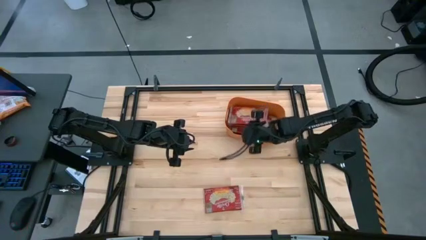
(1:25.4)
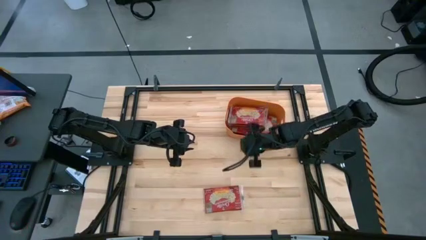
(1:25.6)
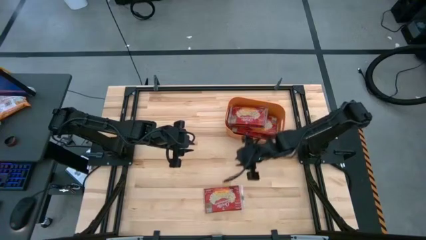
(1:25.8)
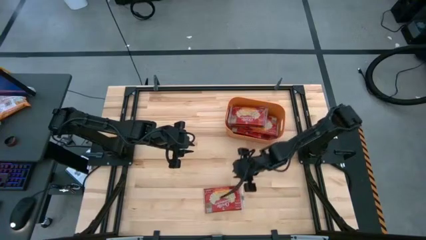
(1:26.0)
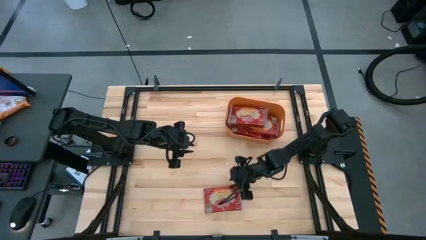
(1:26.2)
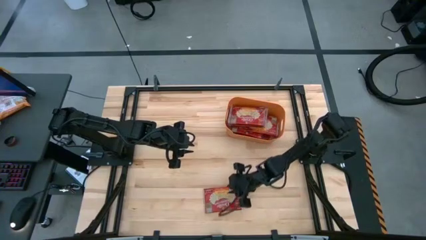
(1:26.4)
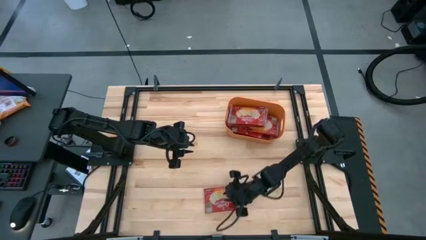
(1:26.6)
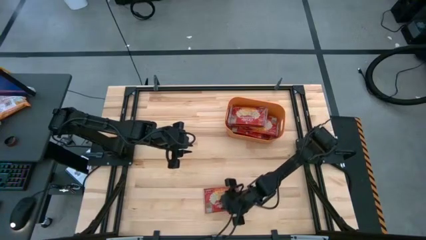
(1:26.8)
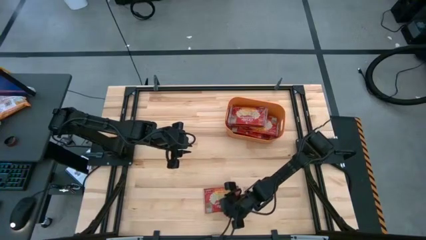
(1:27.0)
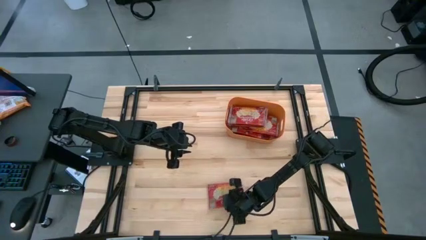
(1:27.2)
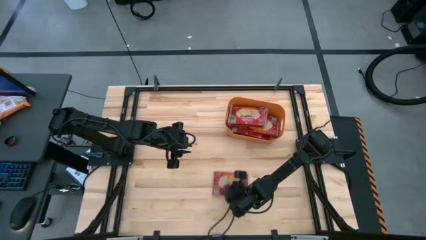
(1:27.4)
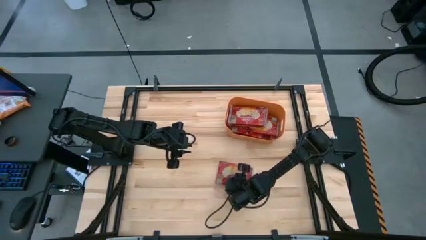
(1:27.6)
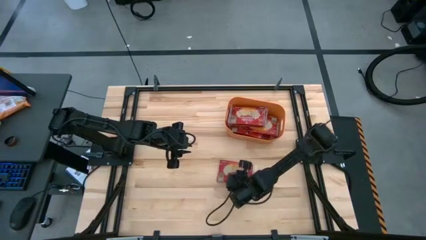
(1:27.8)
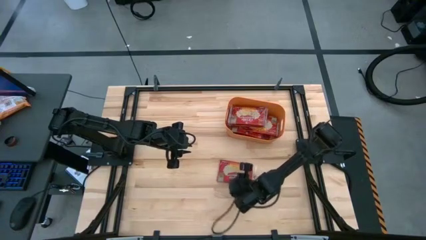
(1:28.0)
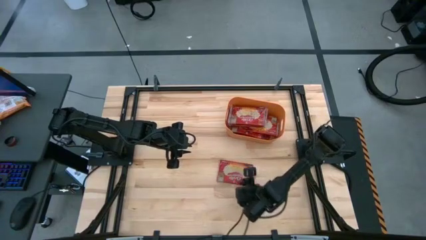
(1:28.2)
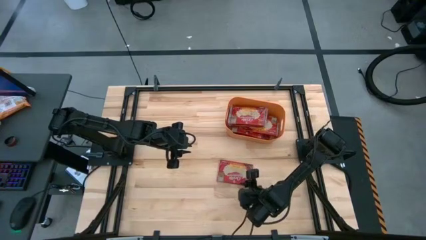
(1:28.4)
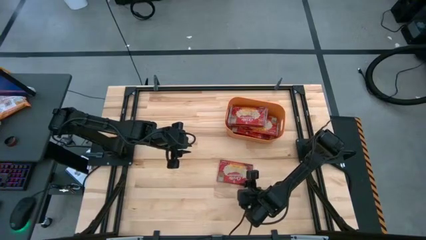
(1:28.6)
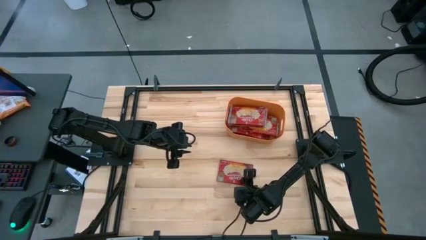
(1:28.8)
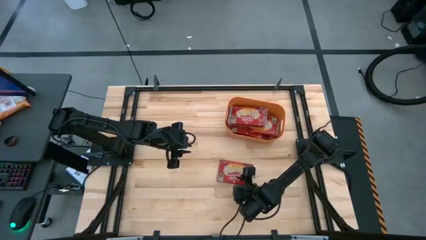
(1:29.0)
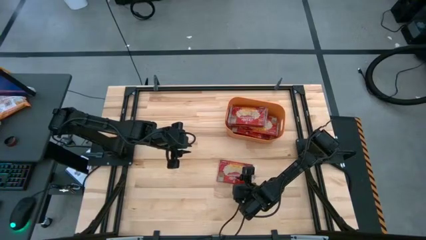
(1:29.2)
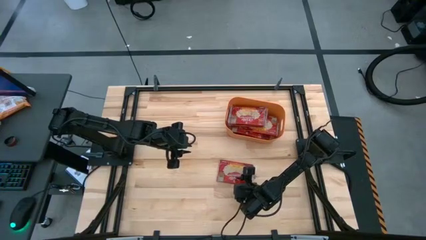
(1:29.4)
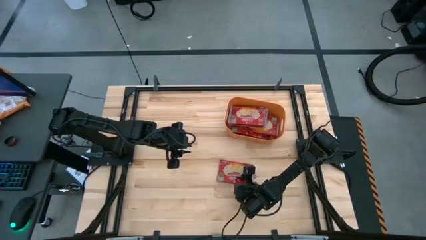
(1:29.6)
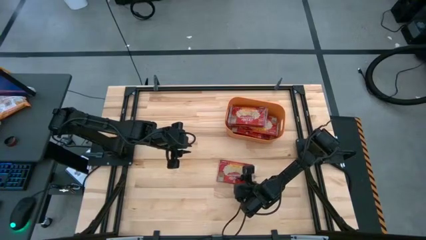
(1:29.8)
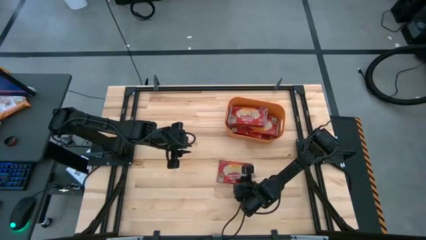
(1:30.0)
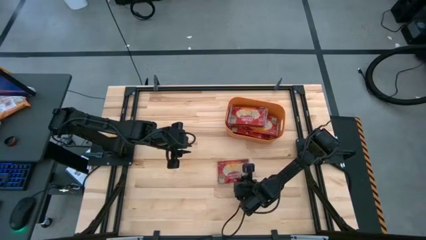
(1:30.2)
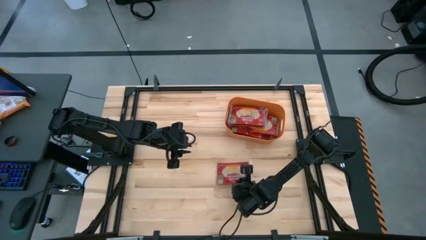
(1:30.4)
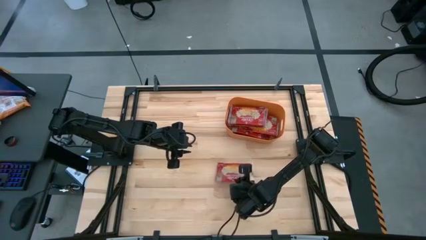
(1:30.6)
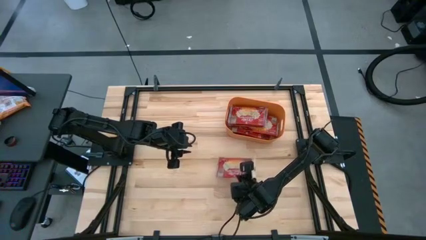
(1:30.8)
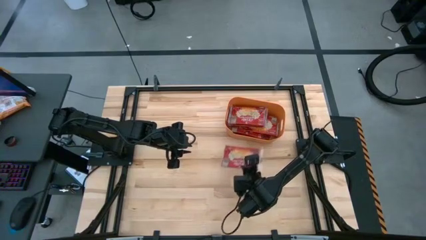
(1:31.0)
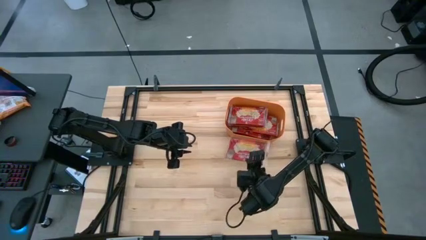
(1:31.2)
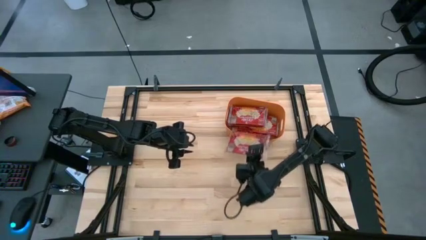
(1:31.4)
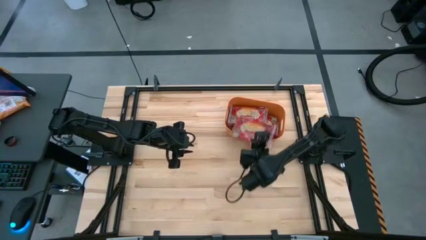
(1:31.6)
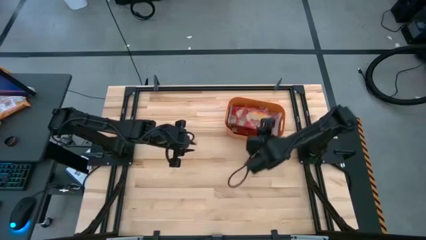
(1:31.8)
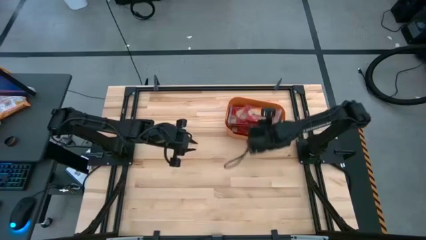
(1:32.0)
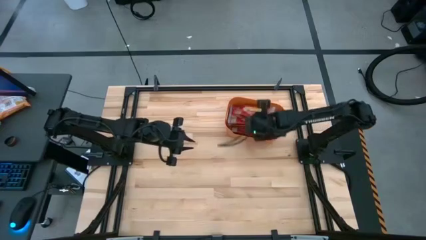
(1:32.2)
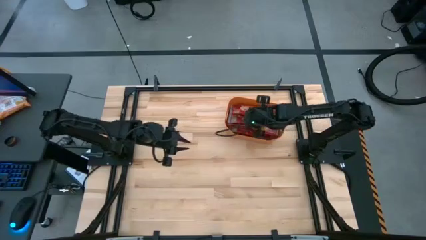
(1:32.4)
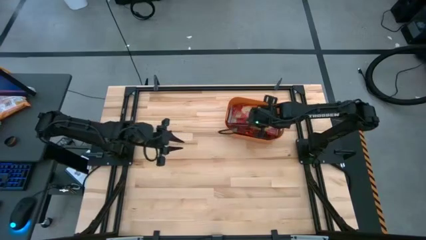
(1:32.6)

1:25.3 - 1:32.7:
Task: Sort popcorn bags into baskets
Put the popcorn bag into the orange bin

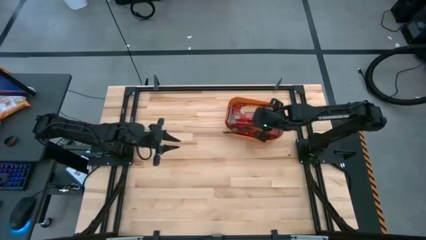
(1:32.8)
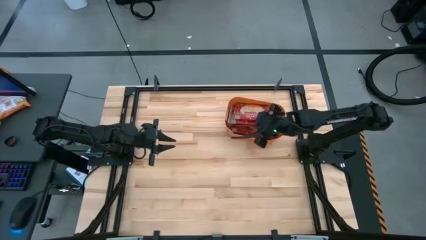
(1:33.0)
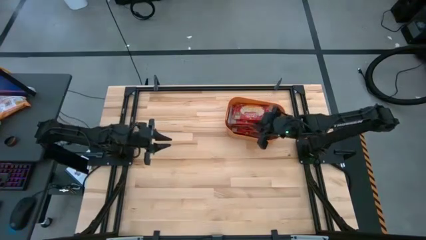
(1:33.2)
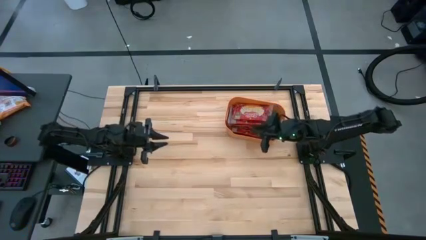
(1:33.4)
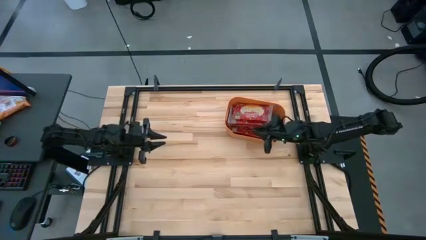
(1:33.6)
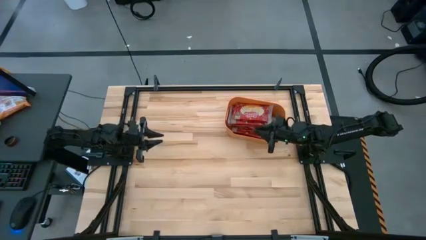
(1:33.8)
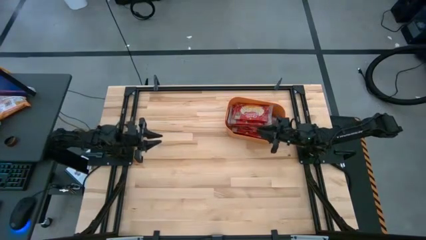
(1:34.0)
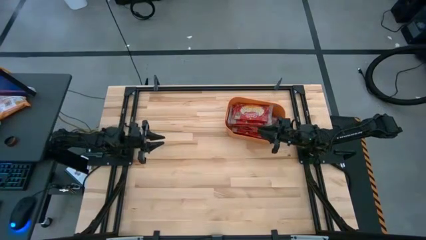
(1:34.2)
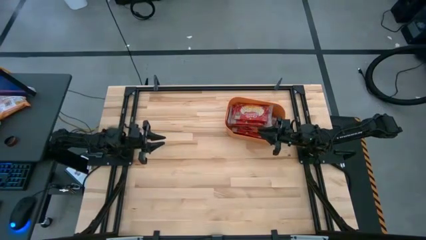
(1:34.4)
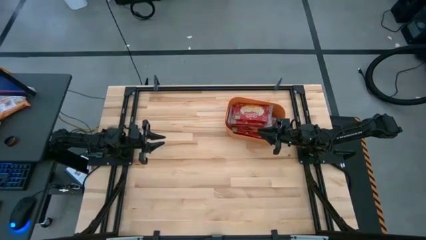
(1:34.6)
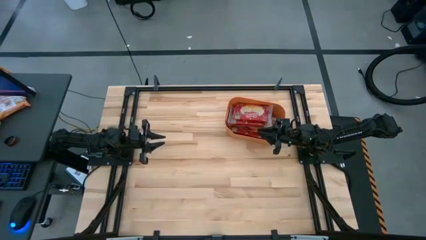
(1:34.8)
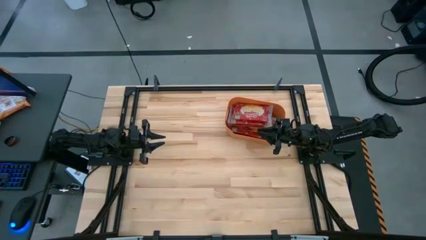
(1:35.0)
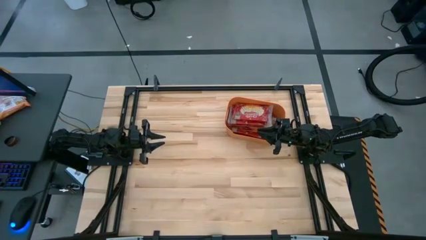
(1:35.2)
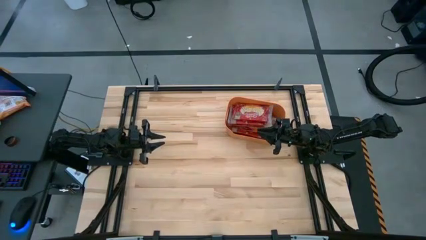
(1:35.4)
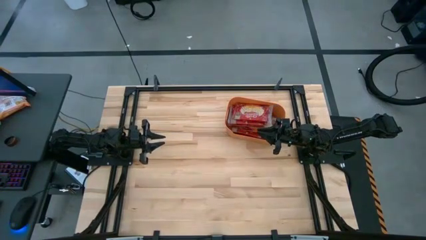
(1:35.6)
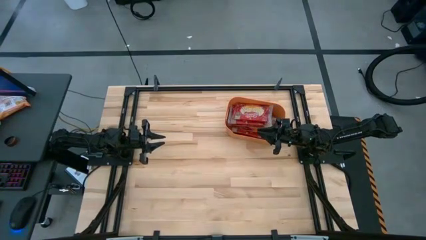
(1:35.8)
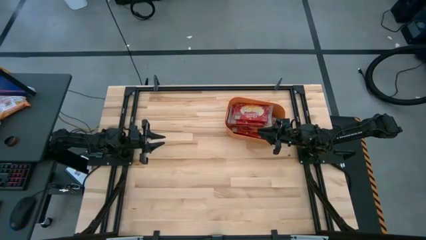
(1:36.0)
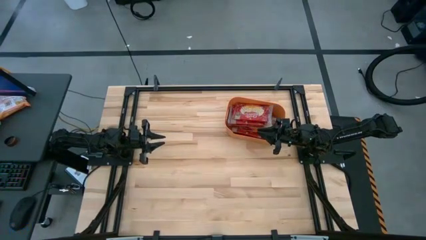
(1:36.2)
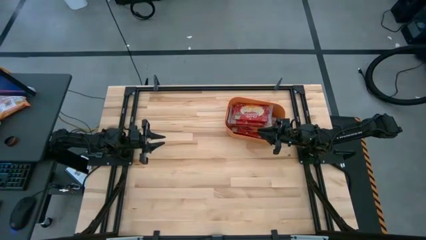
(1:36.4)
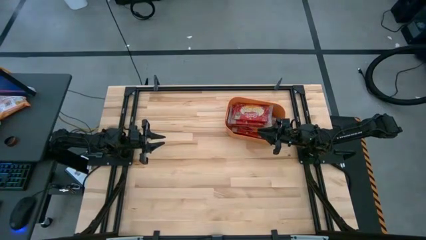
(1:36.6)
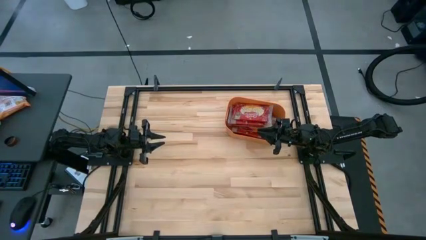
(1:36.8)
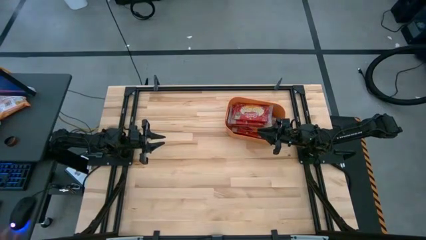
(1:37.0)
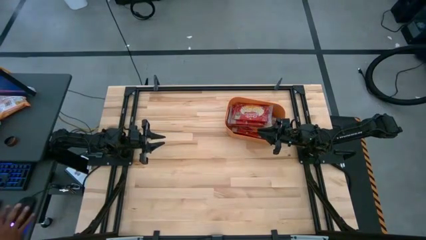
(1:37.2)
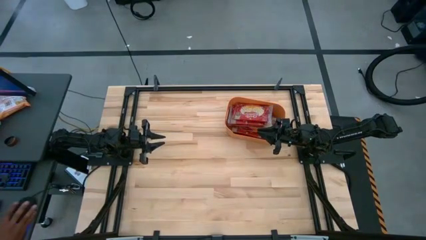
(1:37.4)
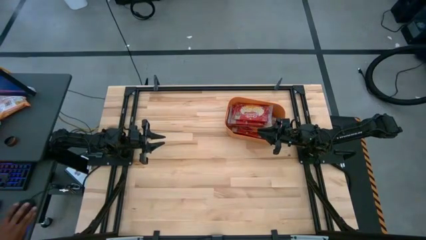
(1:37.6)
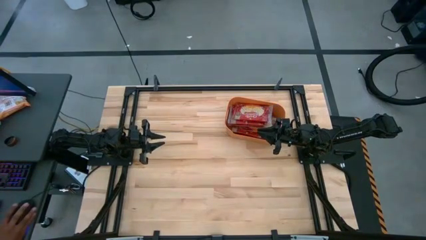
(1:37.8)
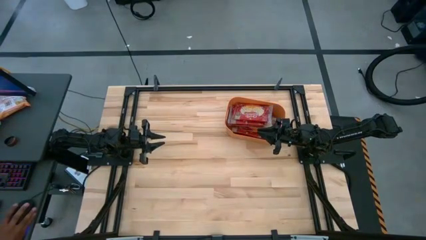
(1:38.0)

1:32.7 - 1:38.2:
Return to Home Position

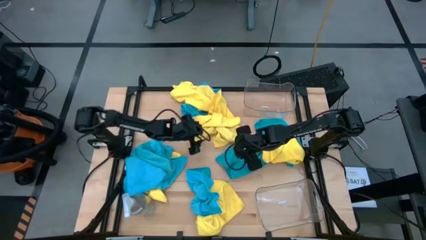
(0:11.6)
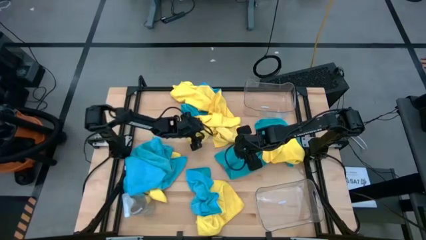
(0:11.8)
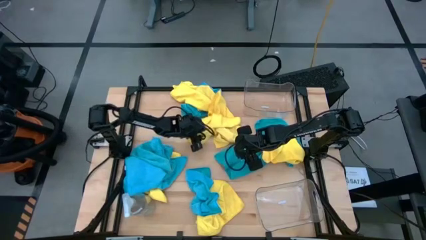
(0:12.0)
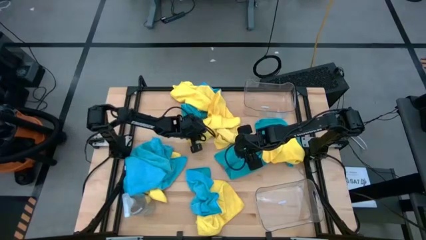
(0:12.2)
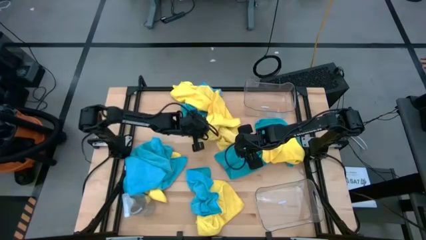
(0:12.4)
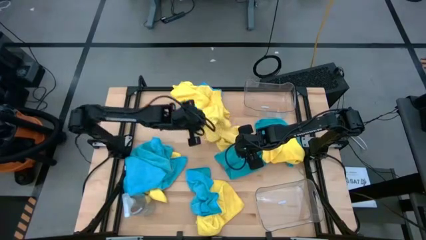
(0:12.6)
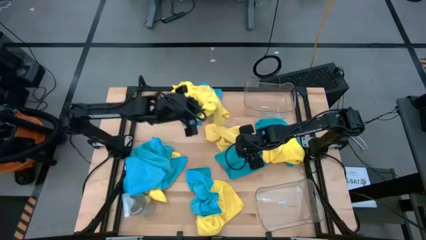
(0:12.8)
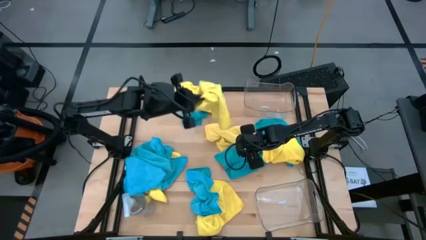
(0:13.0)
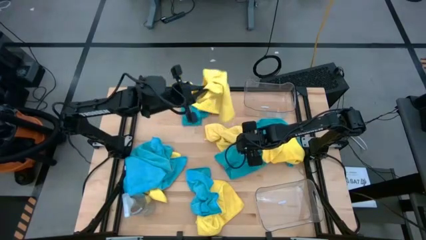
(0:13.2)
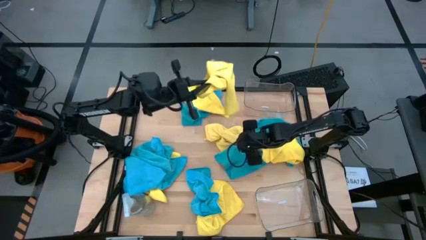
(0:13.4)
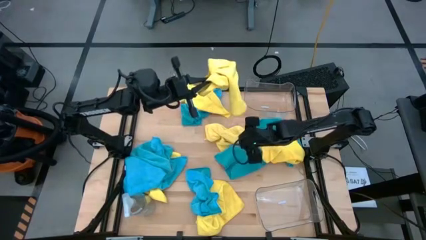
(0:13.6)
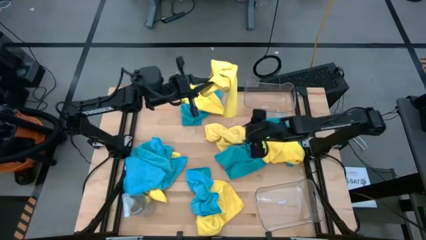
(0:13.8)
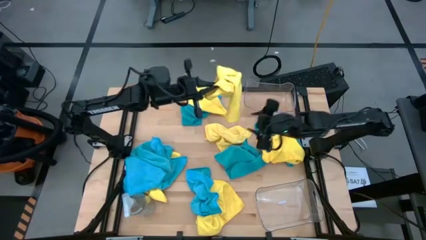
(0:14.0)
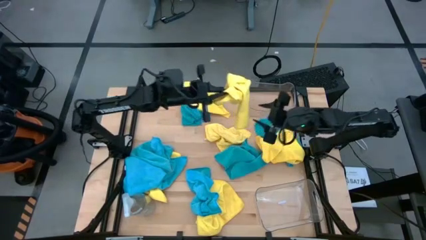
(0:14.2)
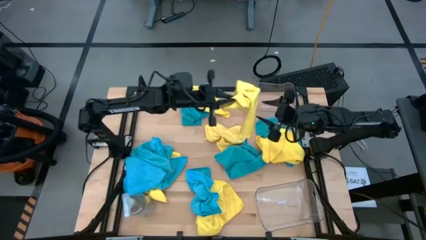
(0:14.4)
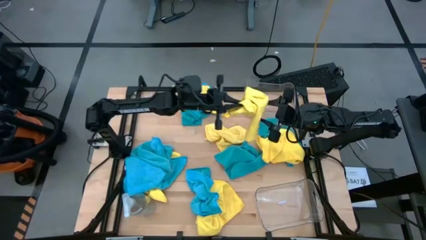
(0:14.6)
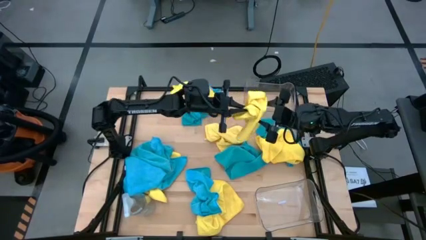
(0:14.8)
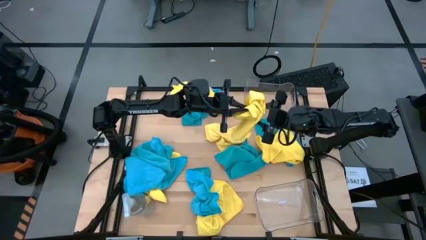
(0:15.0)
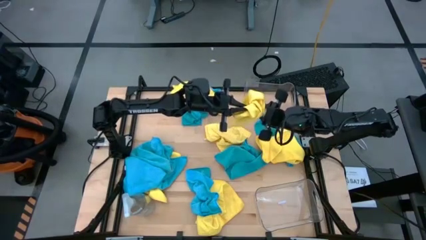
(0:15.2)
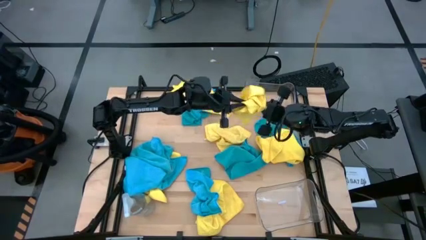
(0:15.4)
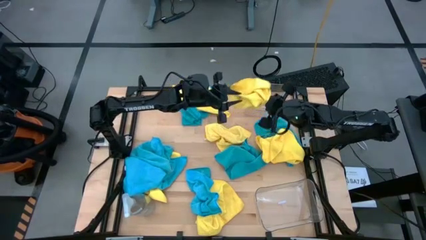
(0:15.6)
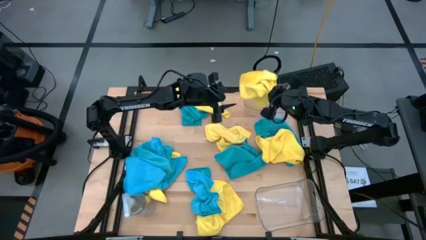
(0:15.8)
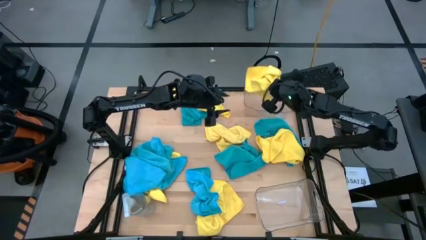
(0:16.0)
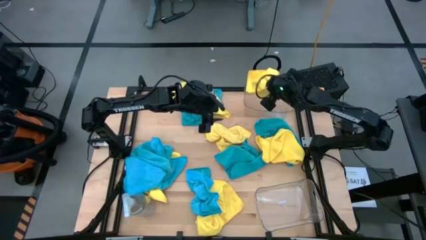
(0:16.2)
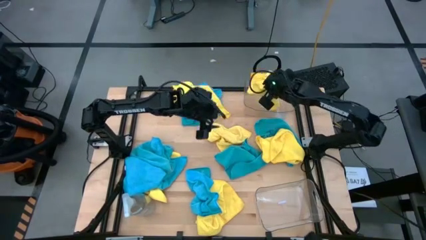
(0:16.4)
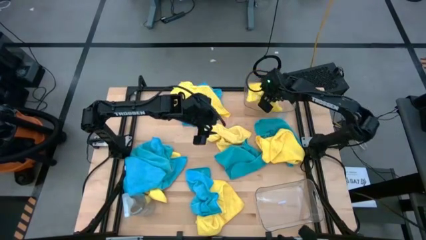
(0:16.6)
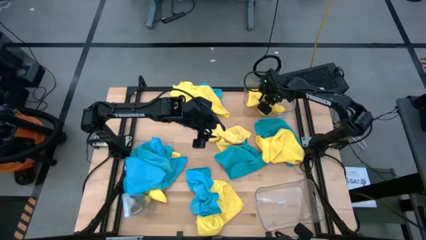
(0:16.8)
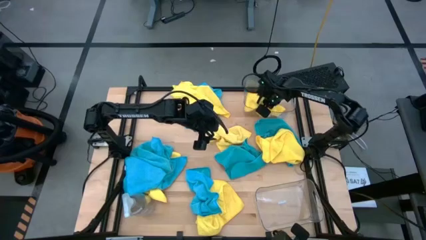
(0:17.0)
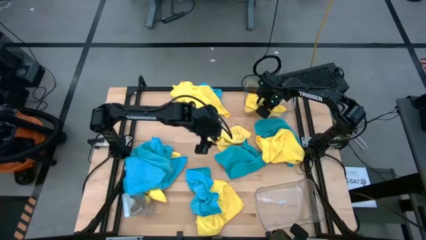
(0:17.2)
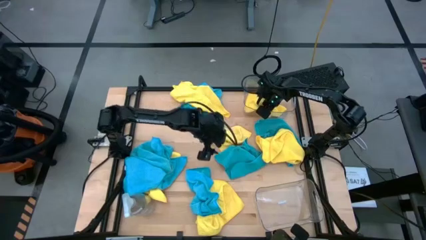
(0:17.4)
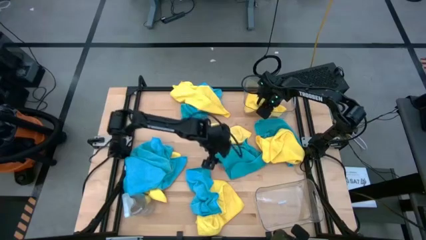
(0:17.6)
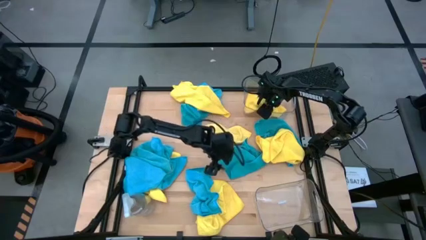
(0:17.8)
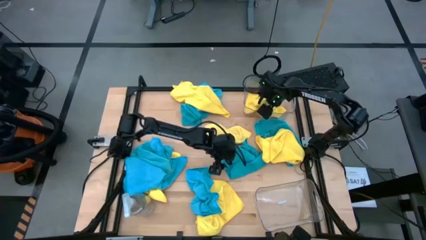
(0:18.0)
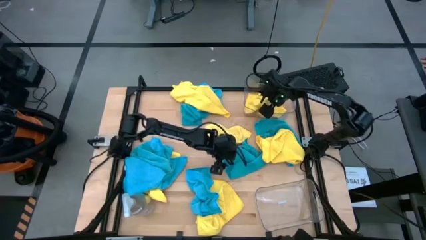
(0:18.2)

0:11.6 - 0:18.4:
Task: Sort microfiber towel by color & place in baskets
Put the yellow microfiber cloth into the top transparent bin
